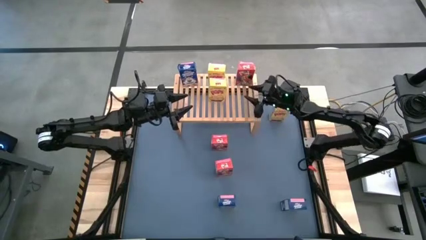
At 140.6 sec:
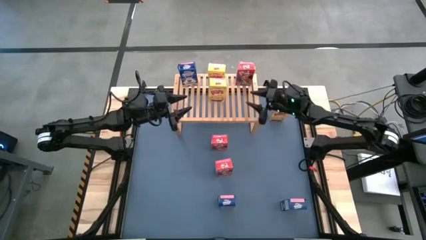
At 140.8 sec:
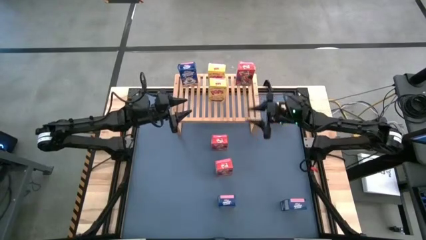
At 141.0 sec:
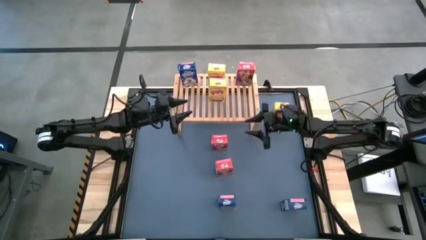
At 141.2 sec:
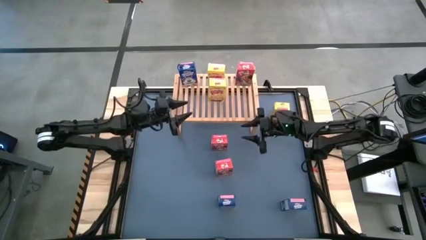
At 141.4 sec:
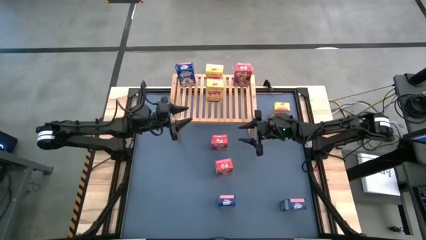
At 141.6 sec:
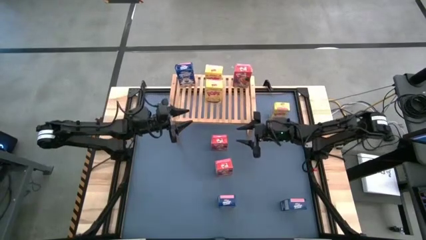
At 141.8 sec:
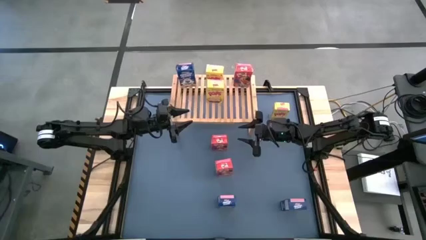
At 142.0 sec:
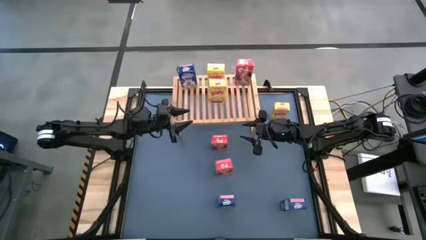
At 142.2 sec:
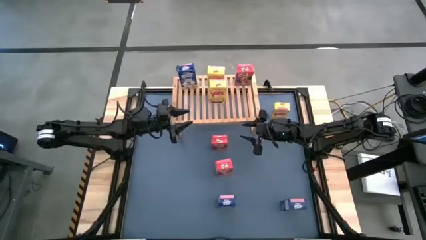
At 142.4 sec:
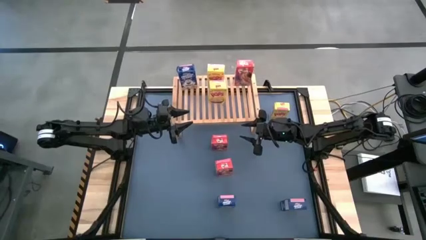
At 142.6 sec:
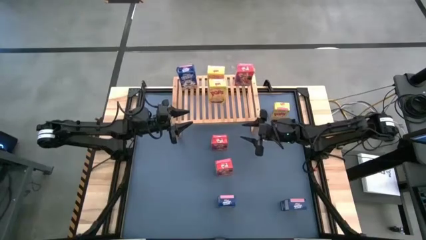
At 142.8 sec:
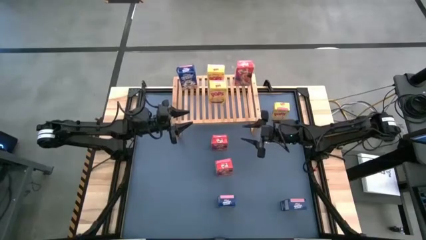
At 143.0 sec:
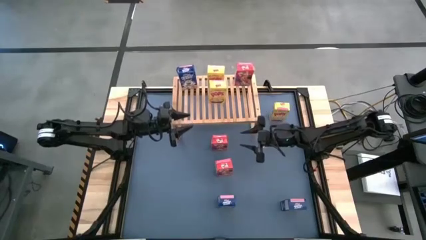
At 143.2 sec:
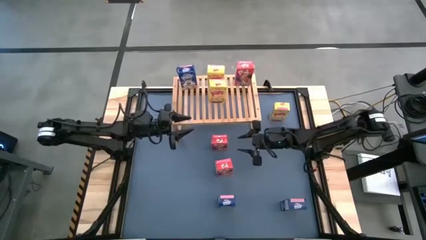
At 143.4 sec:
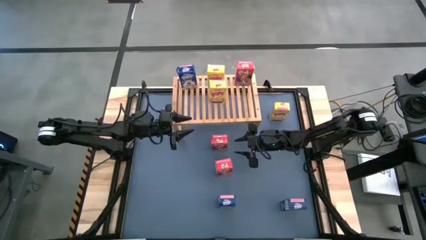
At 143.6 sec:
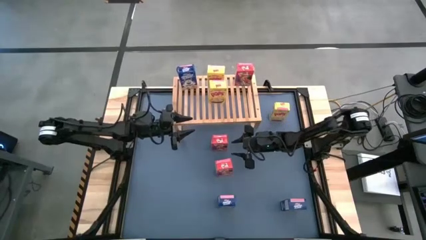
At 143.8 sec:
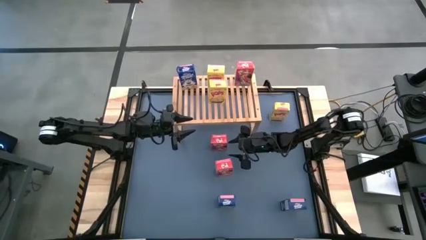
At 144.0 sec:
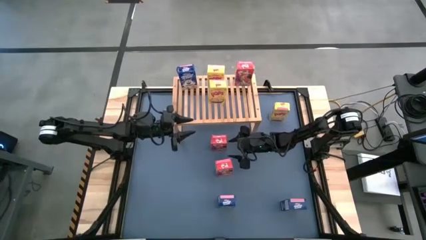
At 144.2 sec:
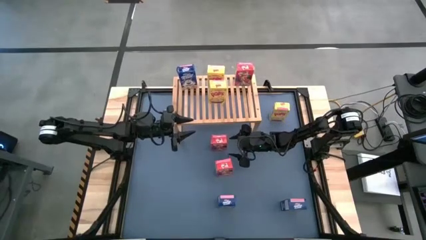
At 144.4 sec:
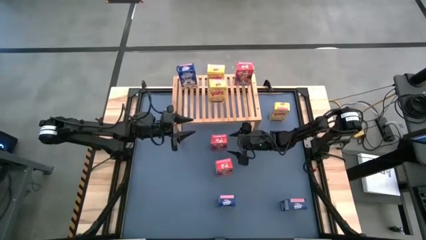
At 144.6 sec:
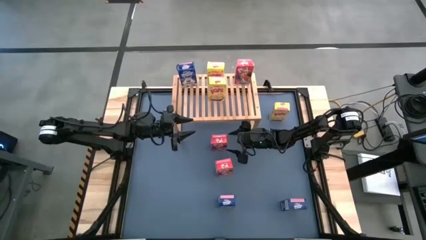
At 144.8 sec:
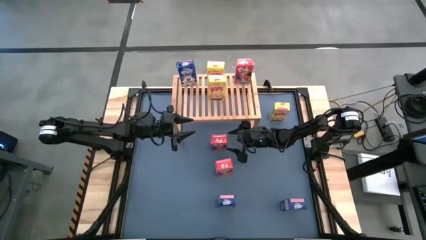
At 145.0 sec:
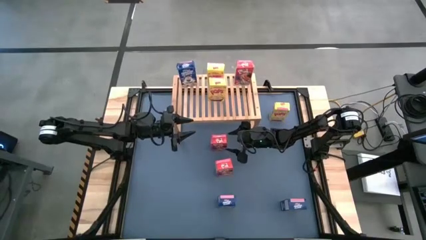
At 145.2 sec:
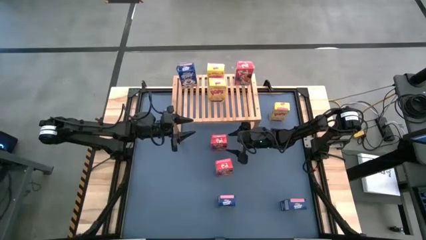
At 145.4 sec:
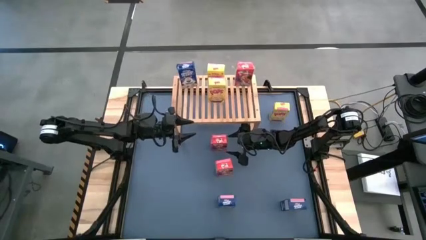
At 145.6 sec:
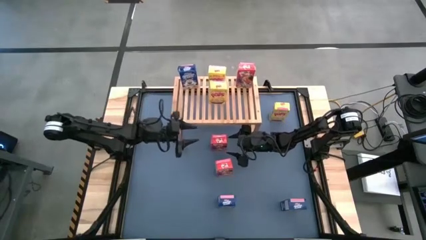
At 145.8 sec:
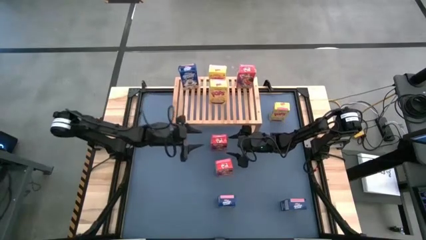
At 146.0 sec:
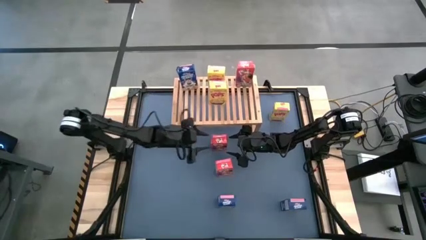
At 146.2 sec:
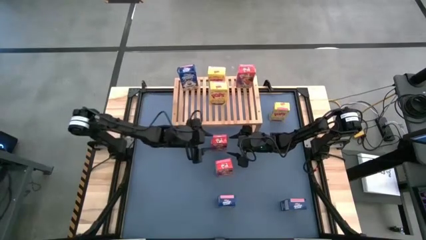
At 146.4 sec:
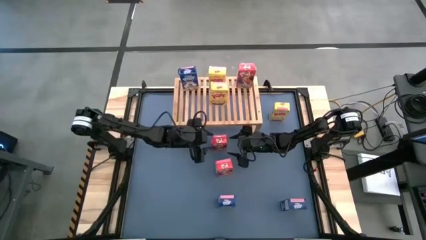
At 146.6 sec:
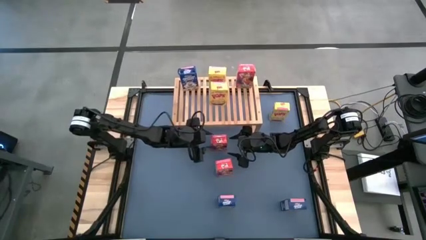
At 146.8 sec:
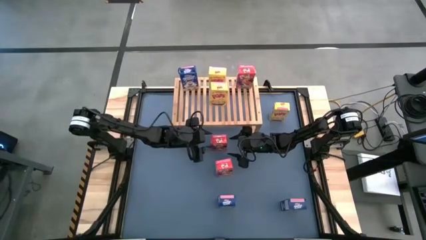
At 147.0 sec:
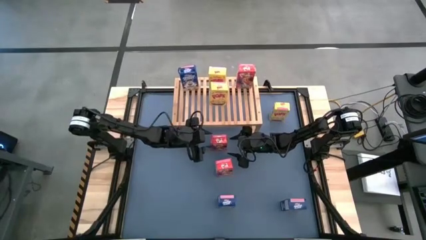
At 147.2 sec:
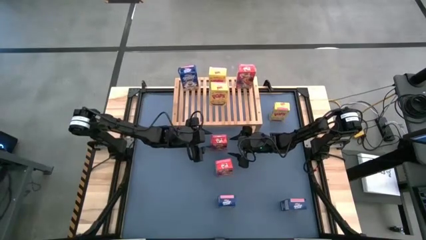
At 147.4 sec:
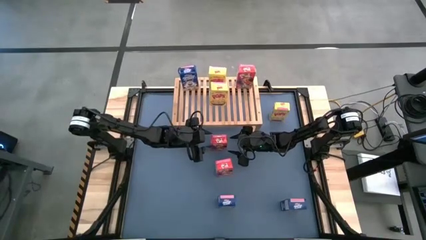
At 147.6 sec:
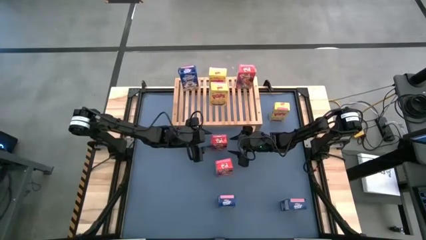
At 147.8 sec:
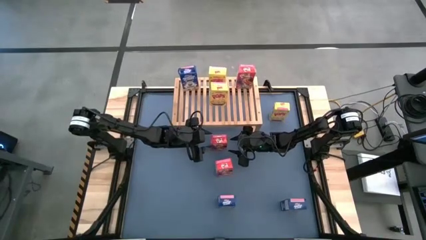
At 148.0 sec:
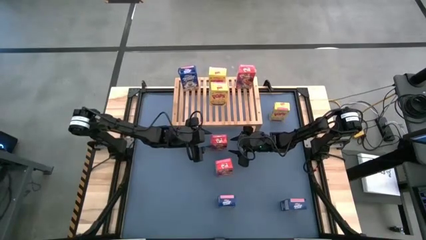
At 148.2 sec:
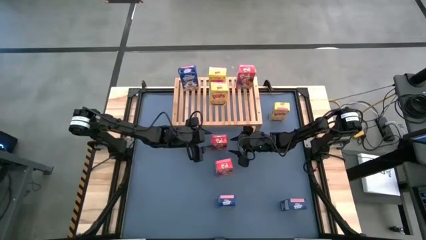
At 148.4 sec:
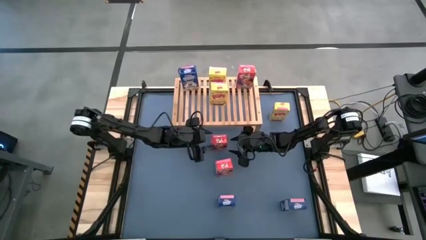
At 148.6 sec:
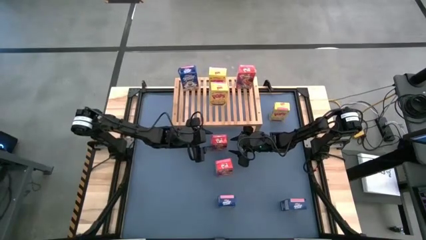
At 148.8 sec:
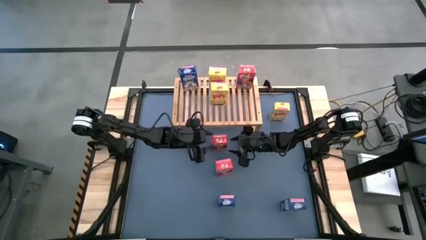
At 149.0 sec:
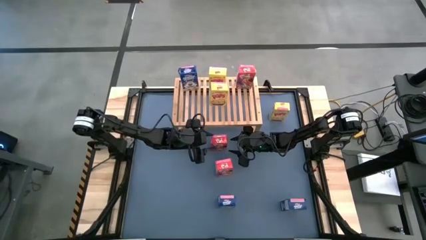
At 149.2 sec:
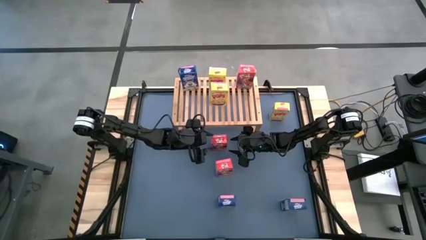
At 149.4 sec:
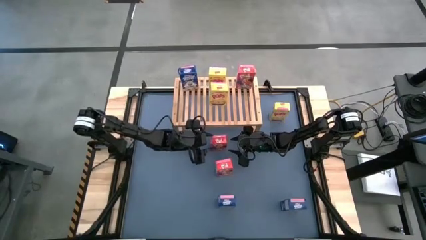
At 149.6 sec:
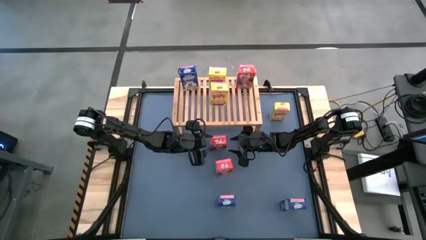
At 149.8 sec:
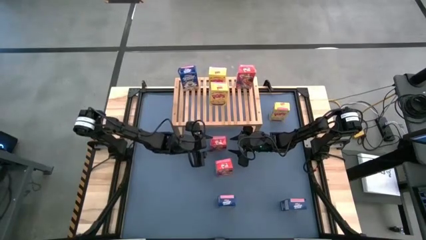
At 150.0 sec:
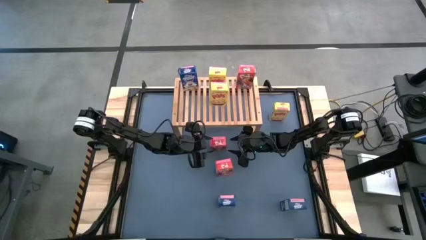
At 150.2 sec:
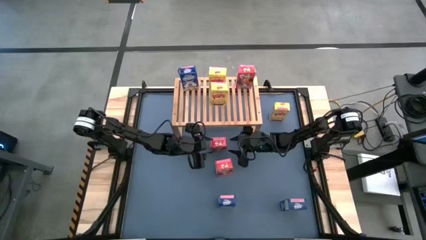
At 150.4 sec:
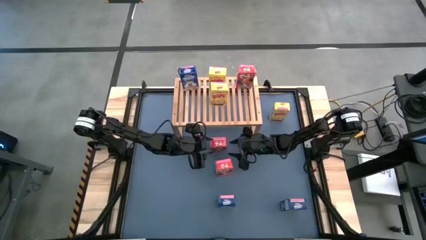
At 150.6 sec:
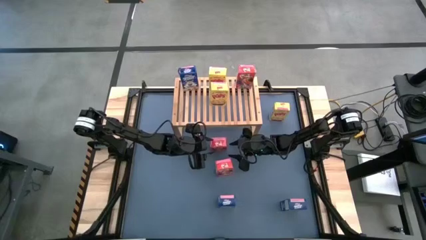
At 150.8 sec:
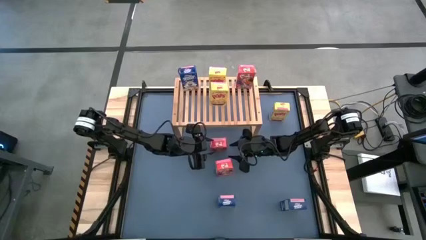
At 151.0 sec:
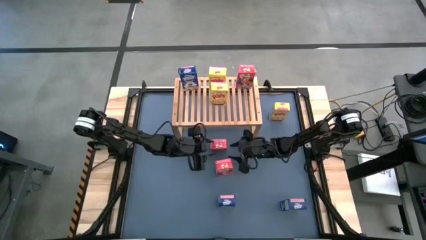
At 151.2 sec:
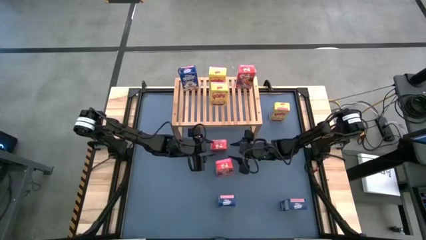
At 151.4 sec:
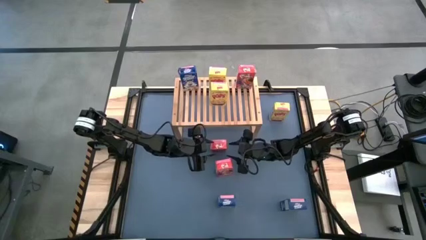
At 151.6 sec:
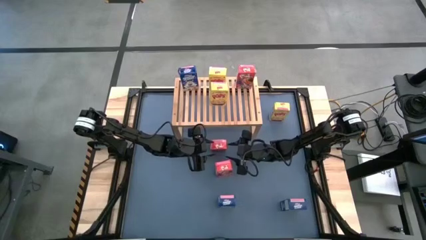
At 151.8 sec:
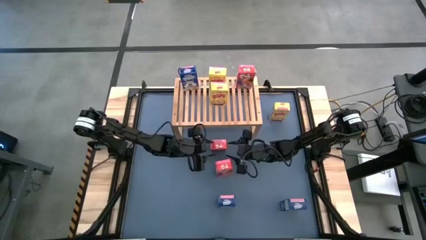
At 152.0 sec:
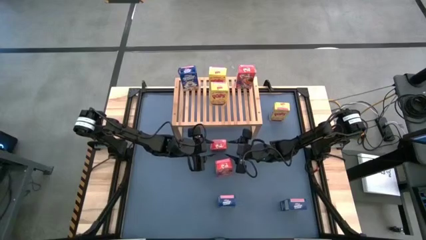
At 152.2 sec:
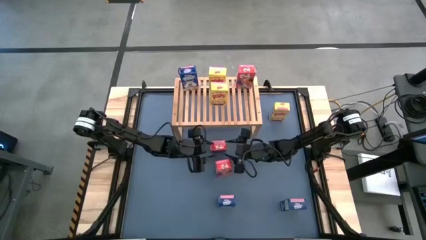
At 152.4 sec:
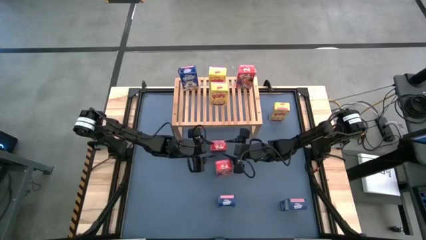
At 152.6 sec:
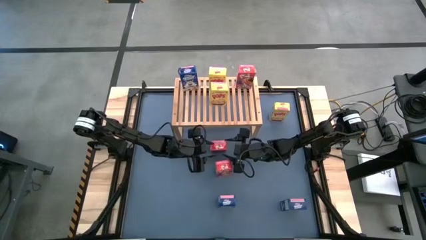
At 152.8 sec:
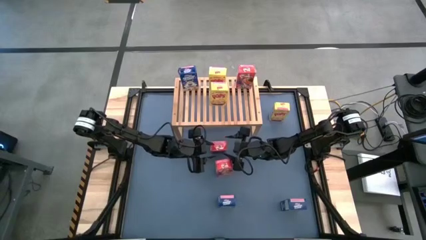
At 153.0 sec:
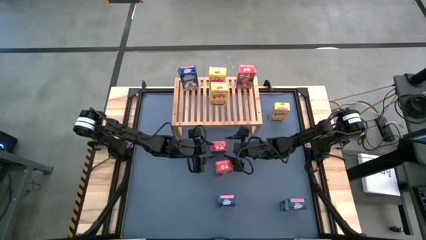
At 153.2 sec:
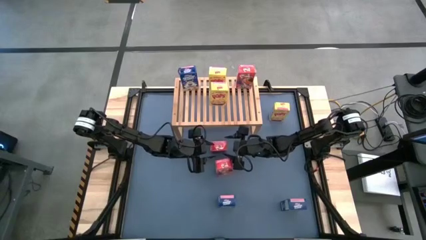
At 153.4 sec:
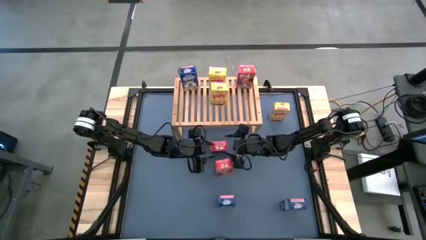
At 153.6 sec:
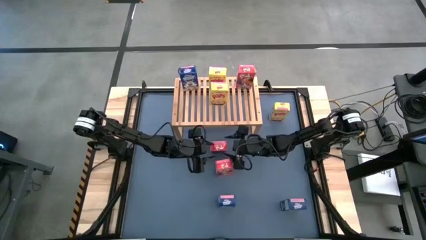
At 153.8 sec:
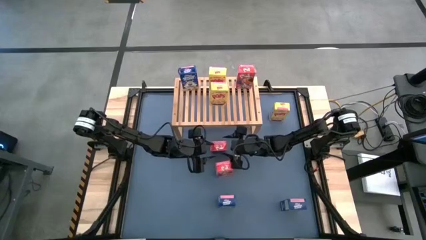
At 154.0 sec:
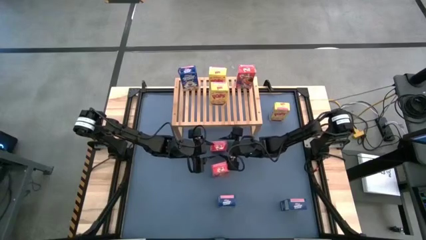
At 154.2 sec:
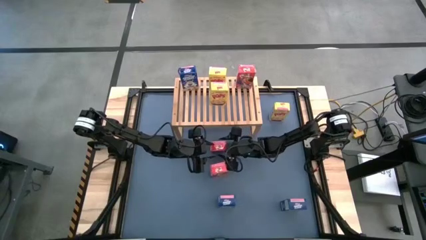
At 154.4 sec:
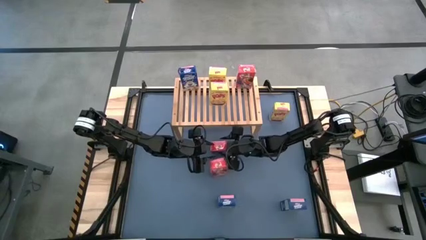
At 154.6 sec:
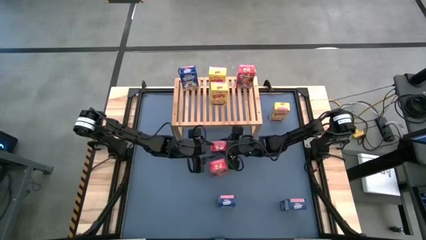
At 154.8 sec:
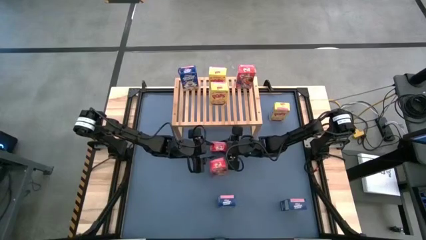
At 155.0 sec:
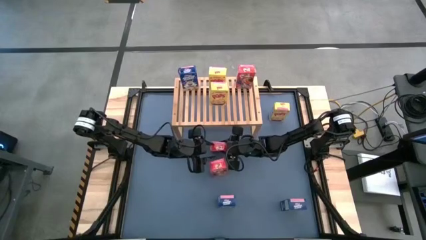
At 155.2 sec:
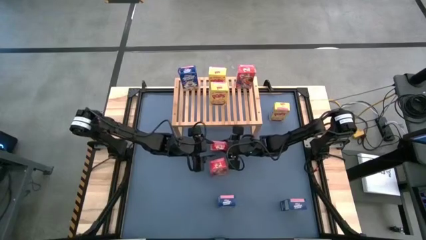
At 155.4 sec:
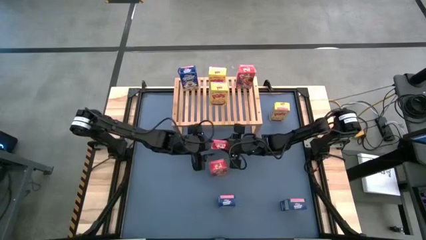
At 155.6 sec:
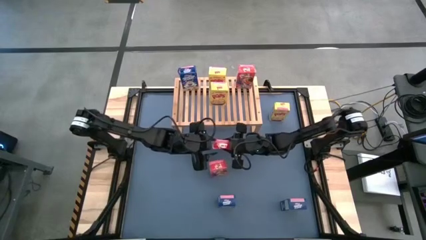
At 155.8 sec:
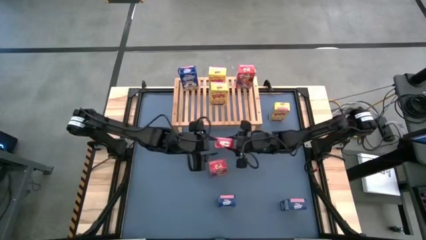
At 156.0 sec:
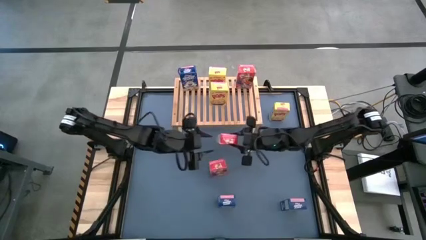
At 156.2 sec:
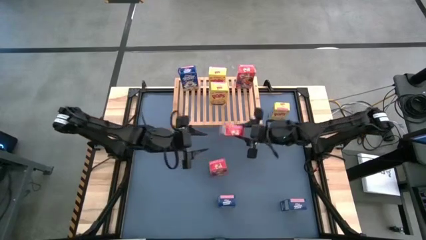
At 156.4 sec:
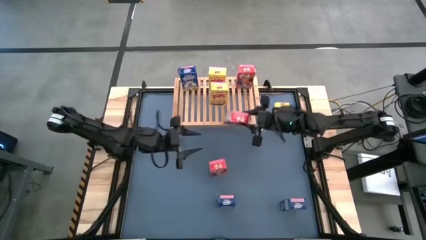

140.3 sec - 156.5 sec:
Task: Stack cereal on shelf
Put the top red cereal box on the shelf aligned with the other red cereal box
